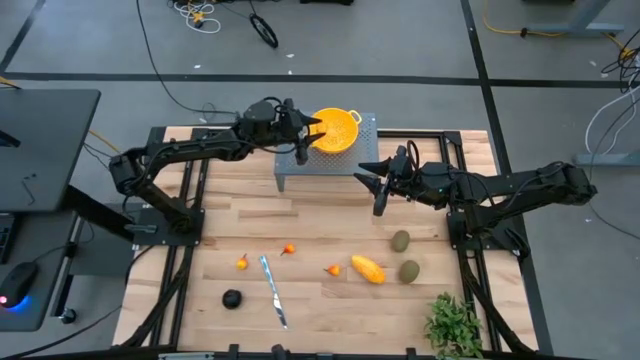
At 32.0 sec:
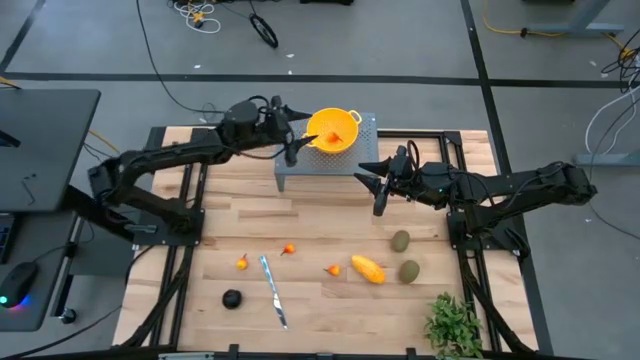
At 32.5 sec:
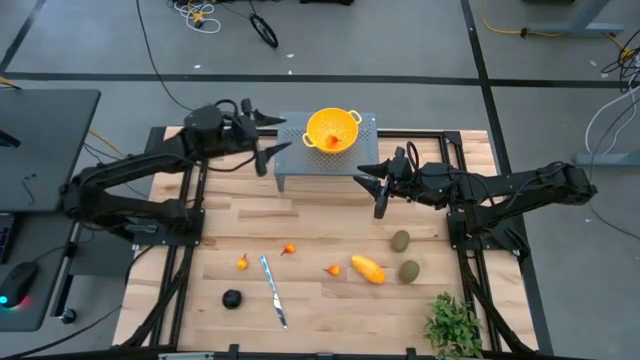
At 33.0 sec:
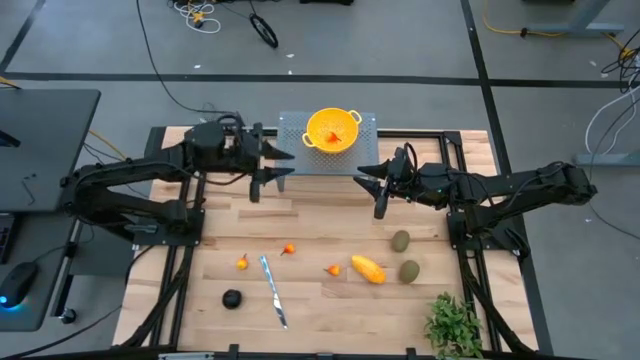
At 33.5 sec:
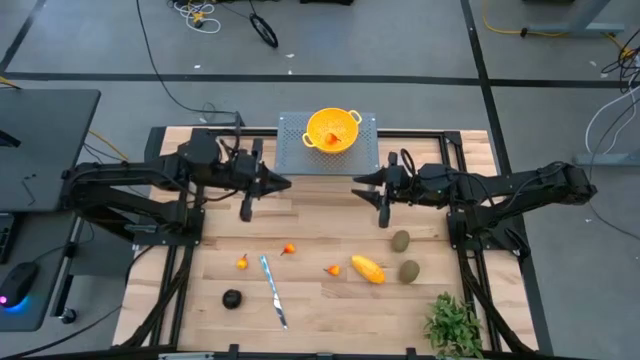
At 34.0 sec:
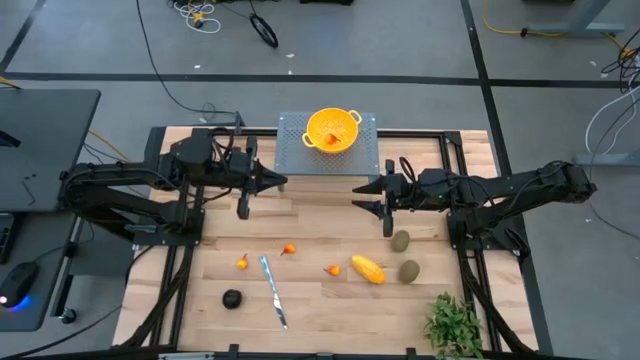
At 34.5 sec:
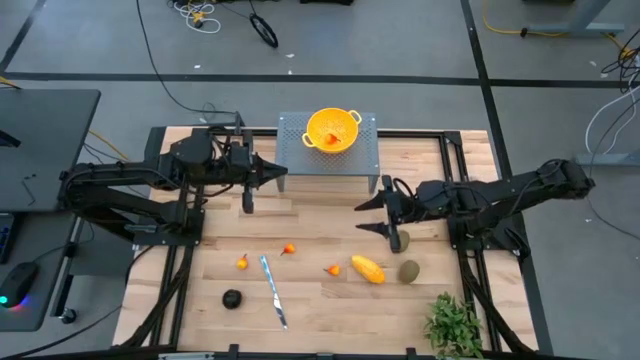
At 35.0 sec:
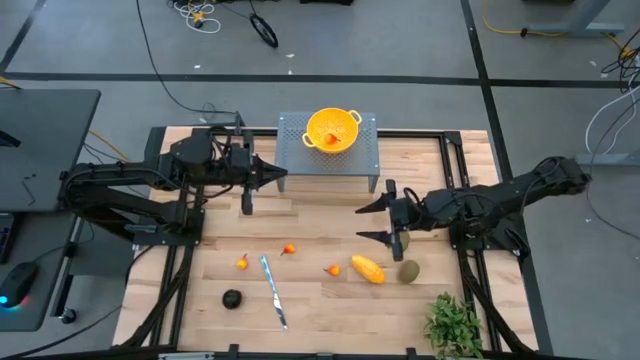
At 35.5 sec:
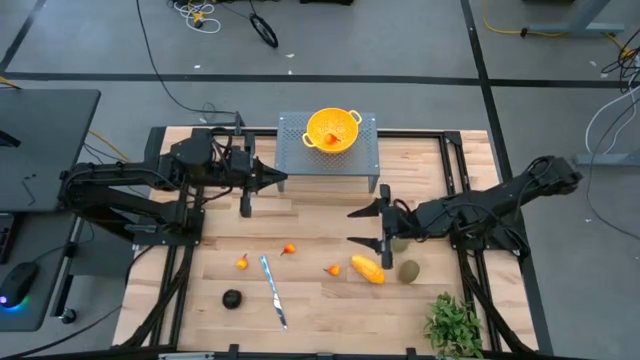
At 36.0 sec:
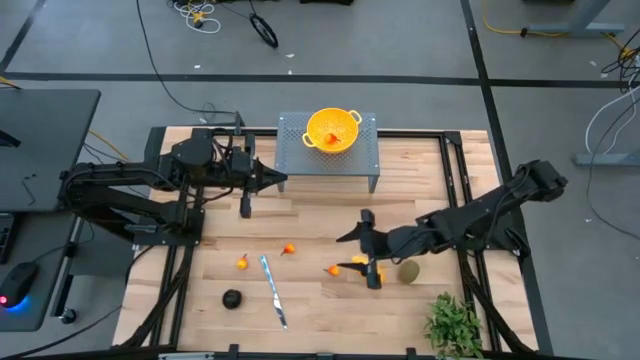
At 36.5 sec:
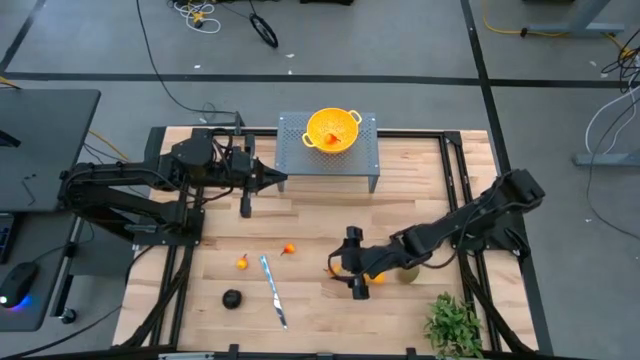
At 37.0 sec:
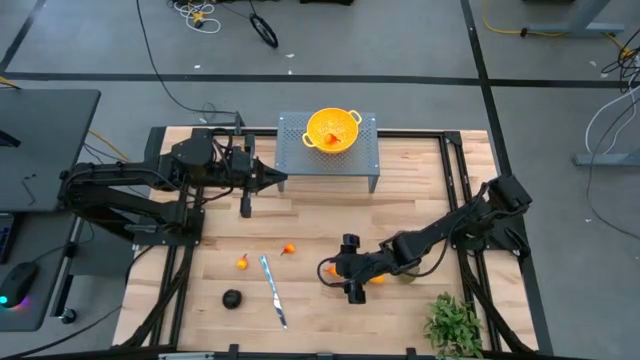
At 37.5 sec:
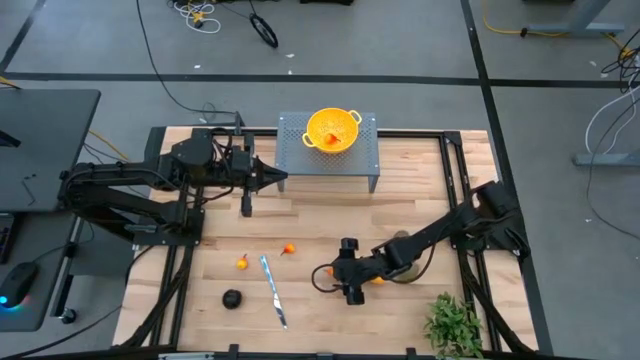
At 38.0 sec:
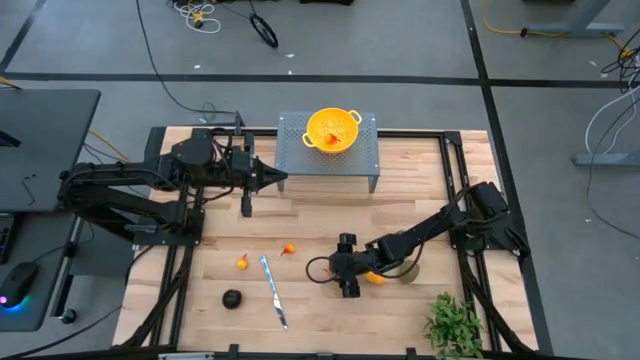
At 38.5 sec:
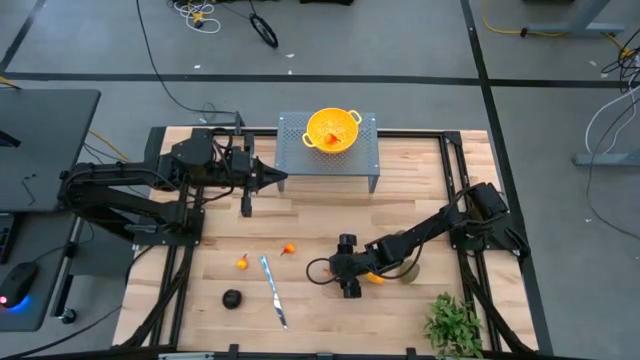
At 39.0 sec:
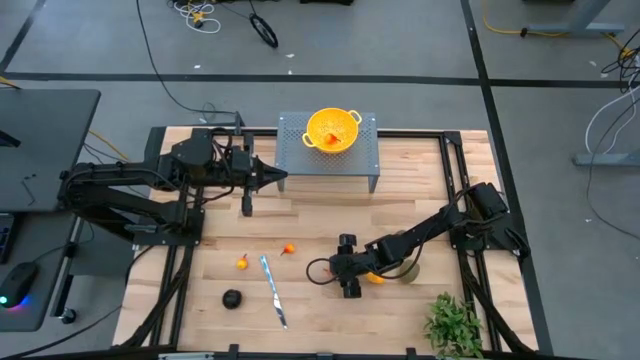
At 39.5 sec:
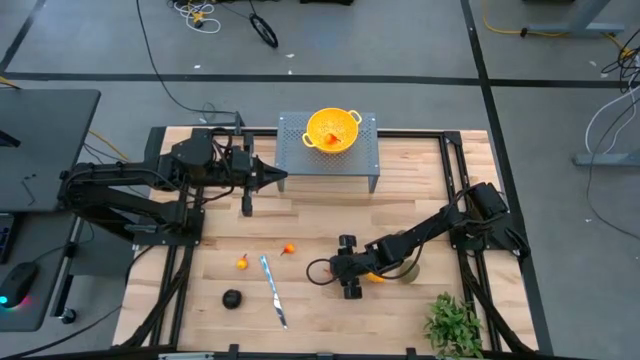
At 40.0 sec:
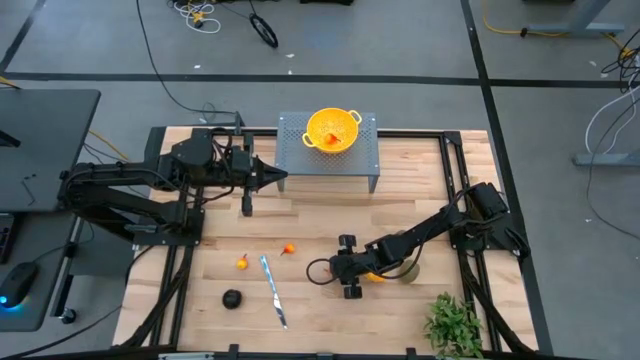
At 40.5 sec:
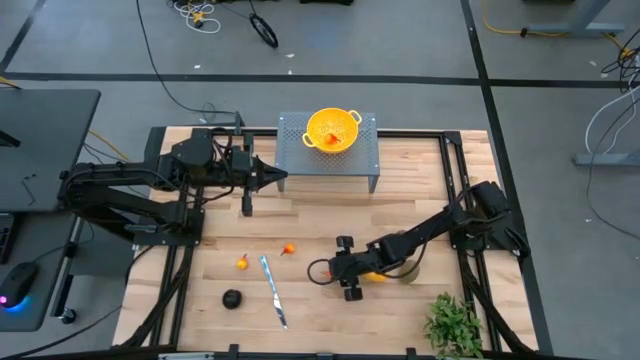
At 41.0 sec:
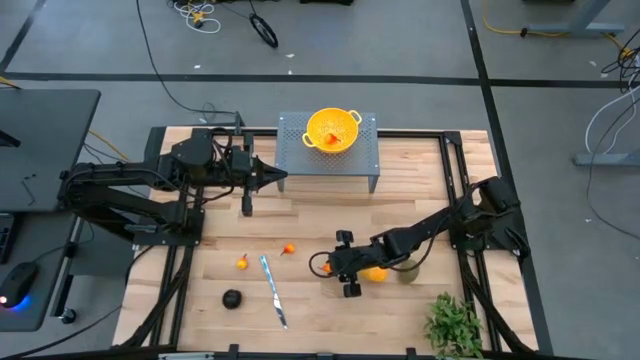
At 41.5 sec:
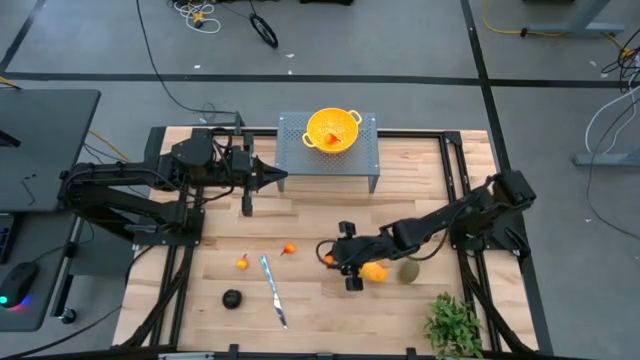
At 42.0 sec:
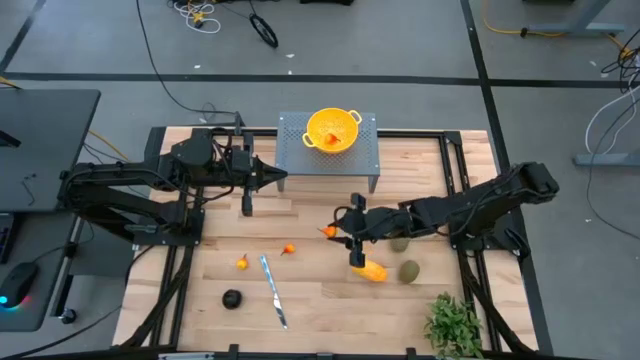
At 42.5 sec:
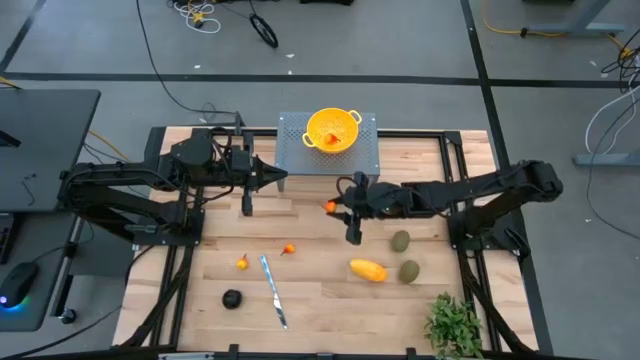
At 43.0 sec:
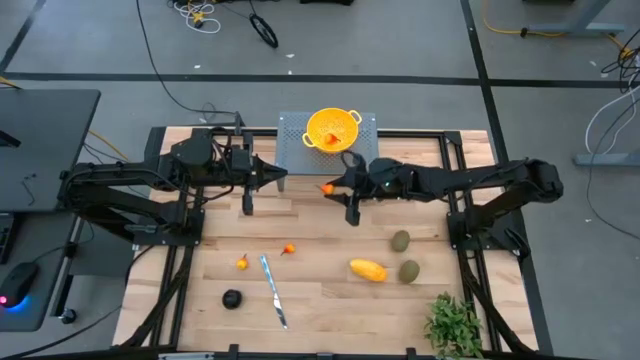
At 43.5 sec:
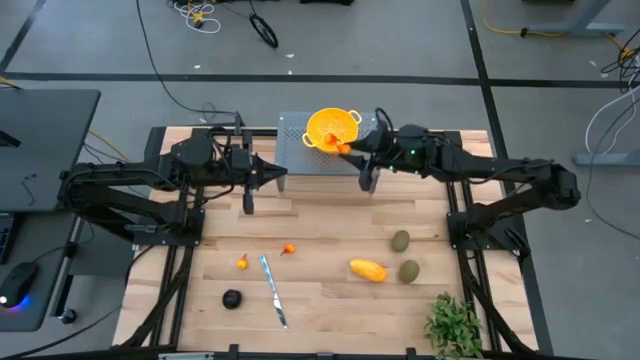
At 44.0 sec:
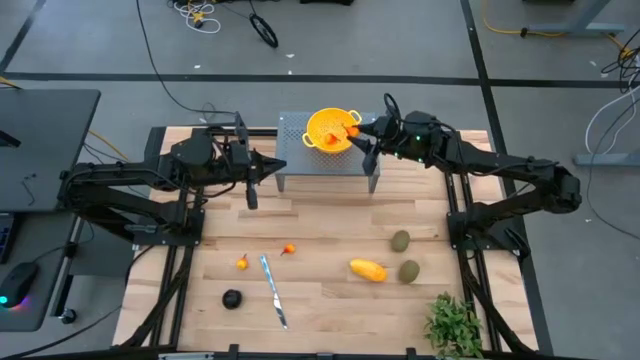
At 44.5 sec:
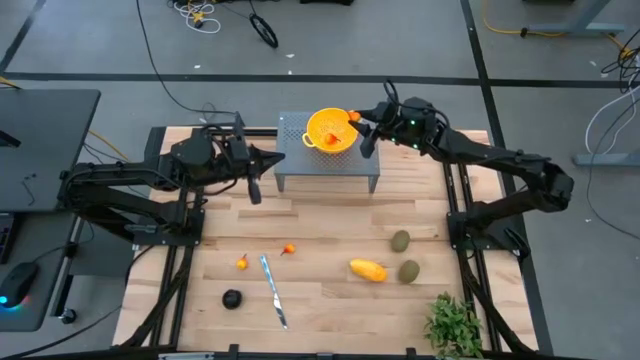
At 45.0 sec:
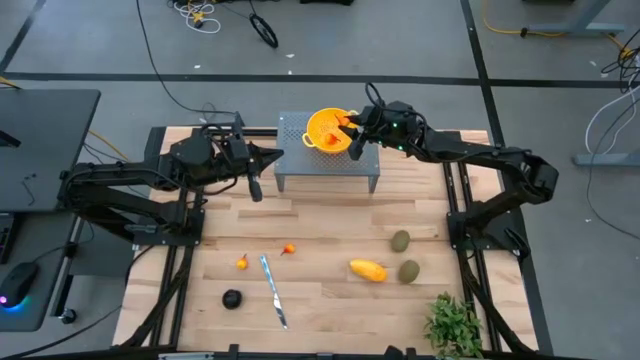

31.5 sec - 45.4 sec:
Task: Pick & Place Fruit
Put the pear into the yellow colander bowl on the shelf

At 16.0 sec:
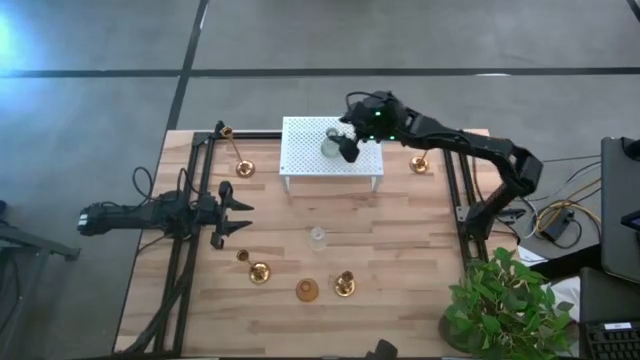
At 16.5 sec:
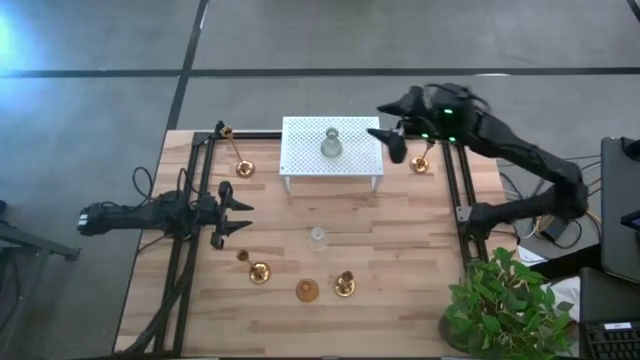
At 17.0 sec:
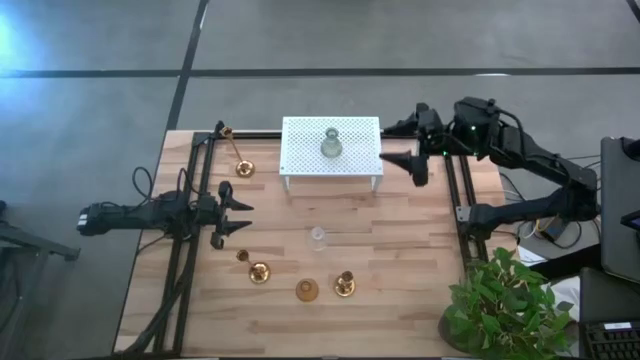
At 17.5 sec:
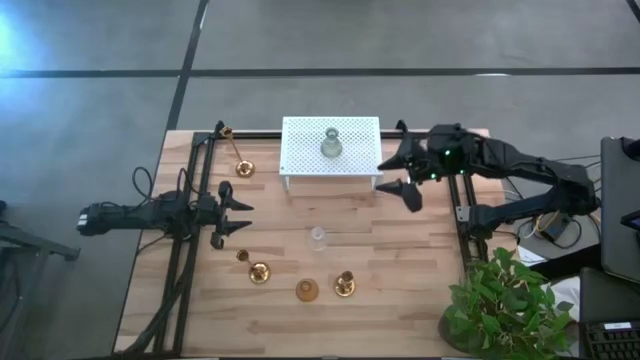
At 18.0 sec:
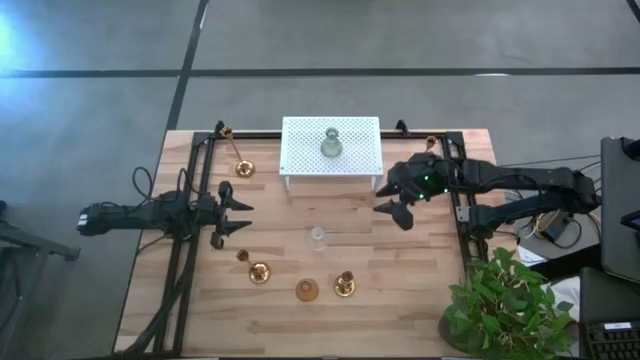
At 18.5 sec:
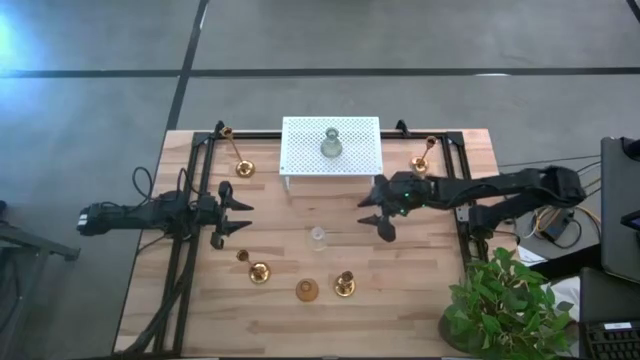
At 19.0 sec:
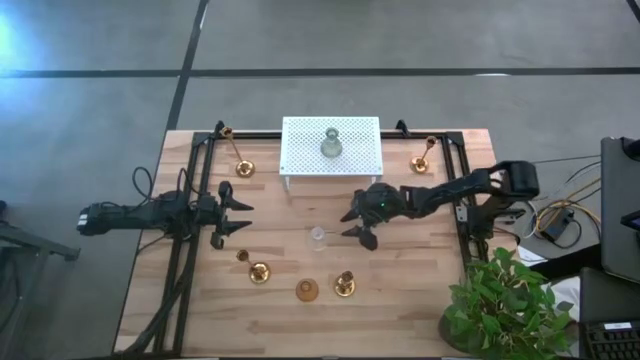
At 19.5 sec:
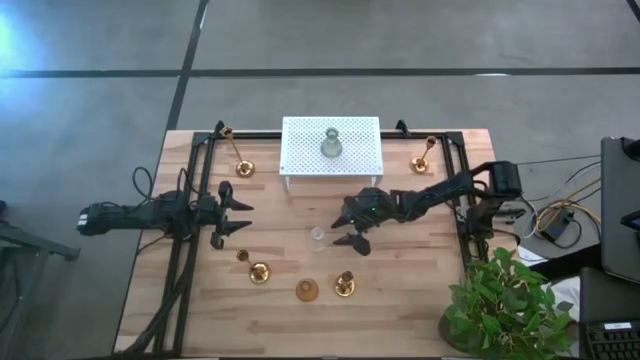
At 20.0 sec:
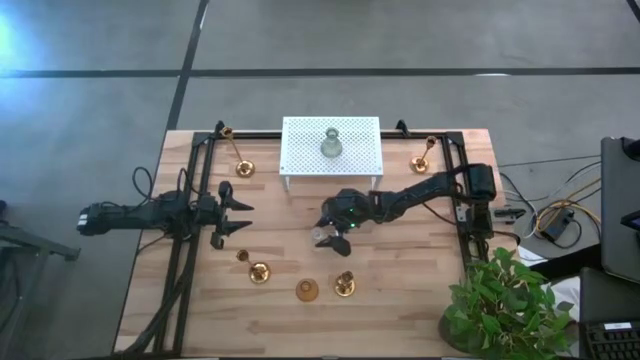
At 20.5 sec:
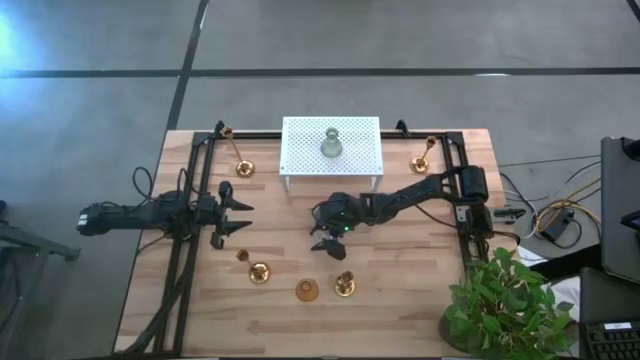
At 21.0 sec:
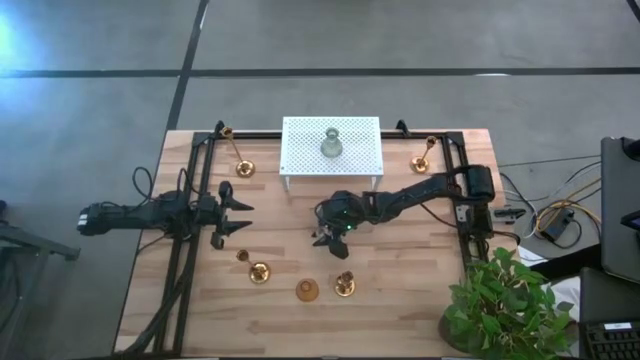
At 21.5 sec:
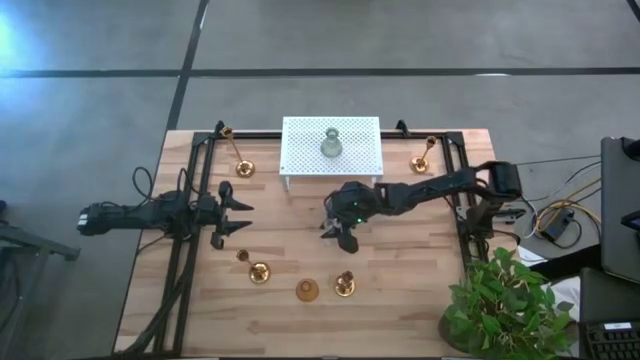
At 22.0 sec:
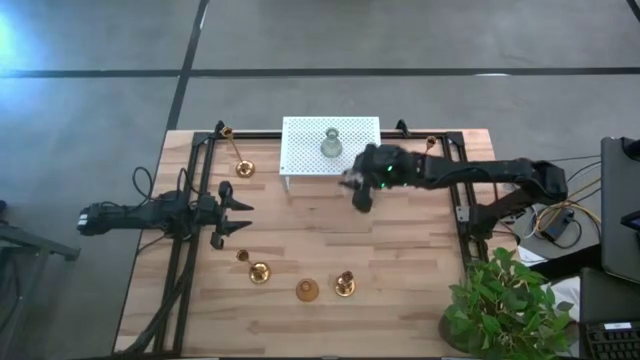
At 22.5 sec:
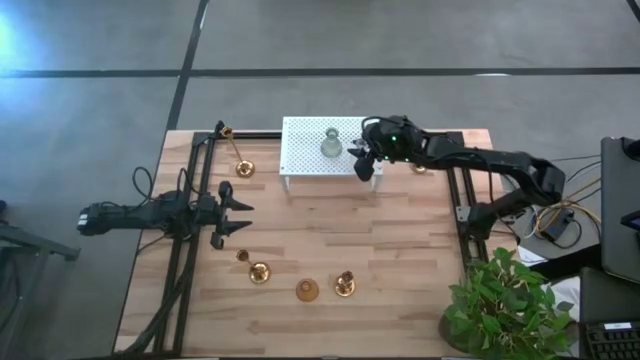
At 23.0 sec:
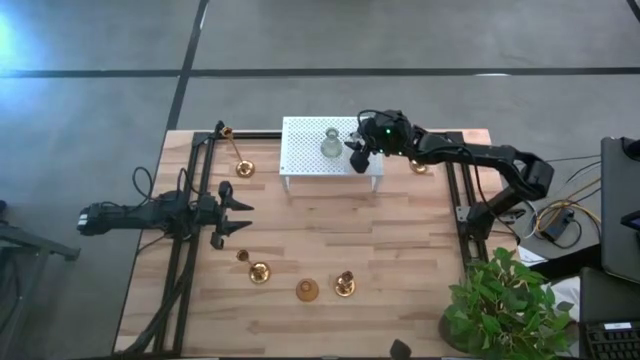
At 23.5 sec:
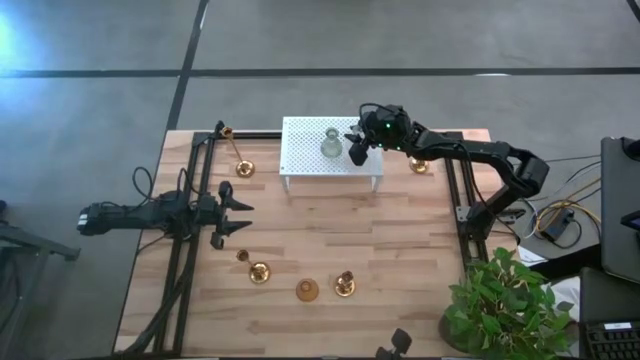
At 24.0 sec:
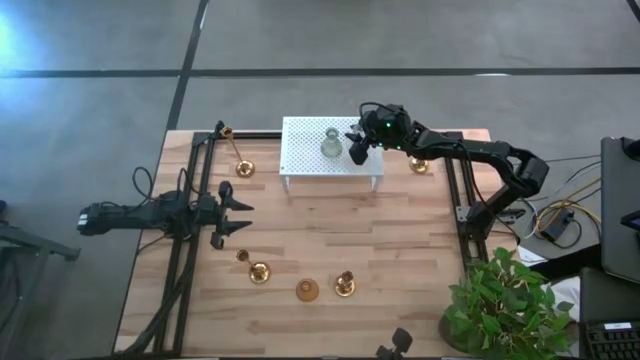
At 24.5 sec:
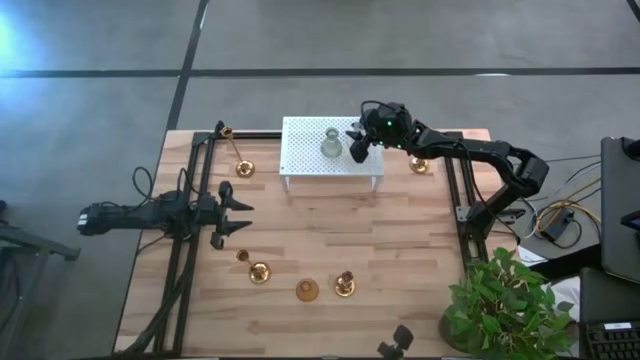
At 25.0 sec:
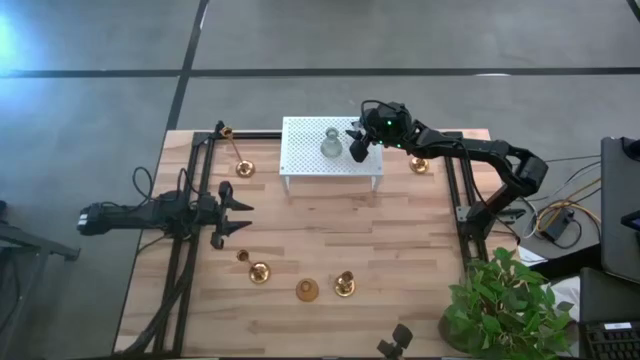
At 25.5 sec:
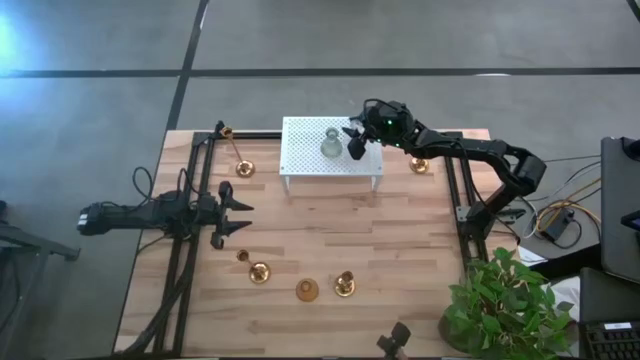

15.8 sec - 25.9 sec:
Task: Pick & Place candle stick holders
Put the transparent glass candle holder on the shelf
